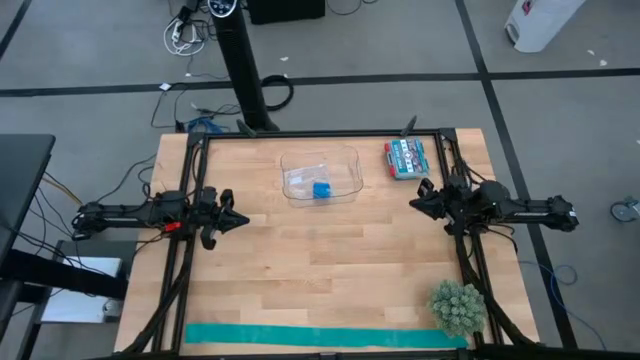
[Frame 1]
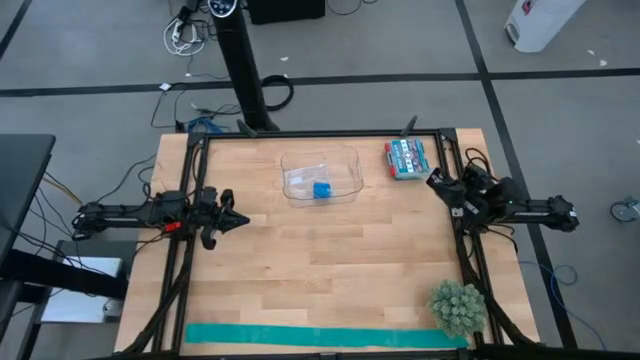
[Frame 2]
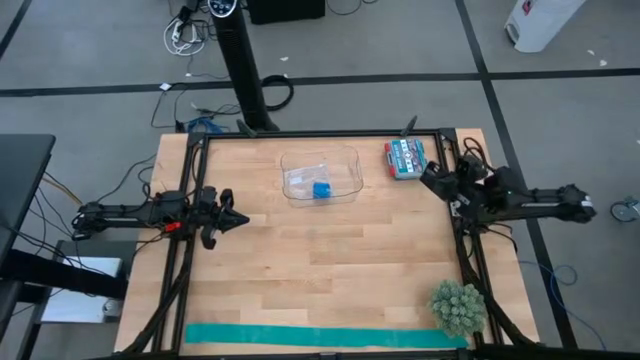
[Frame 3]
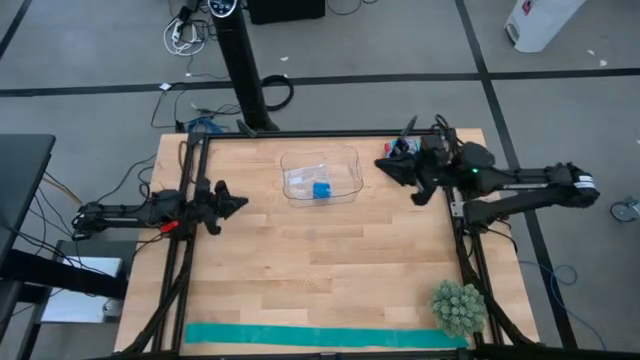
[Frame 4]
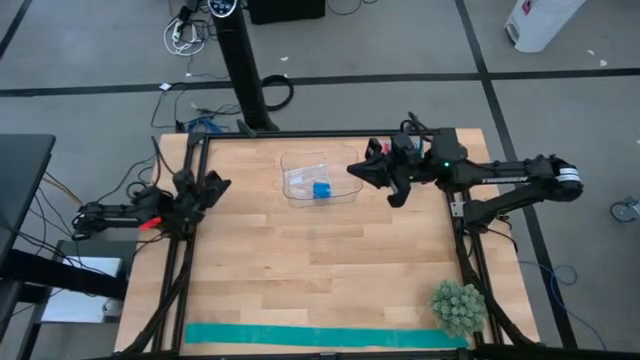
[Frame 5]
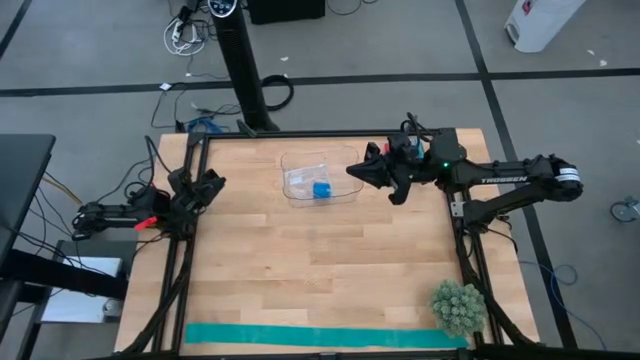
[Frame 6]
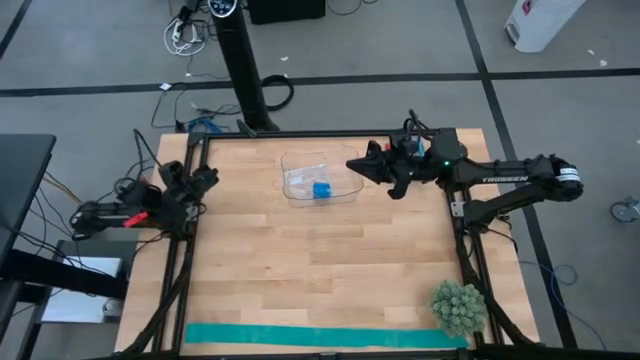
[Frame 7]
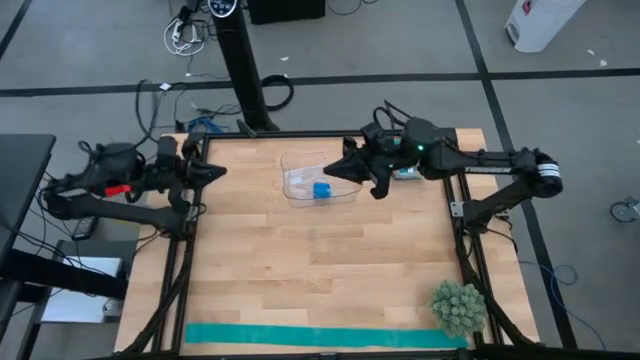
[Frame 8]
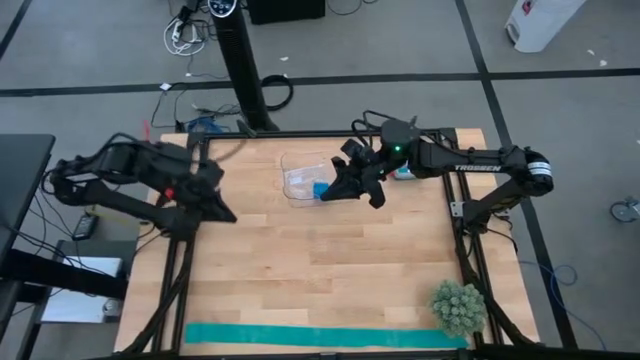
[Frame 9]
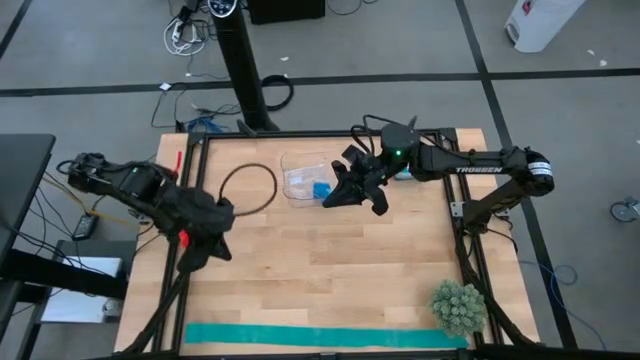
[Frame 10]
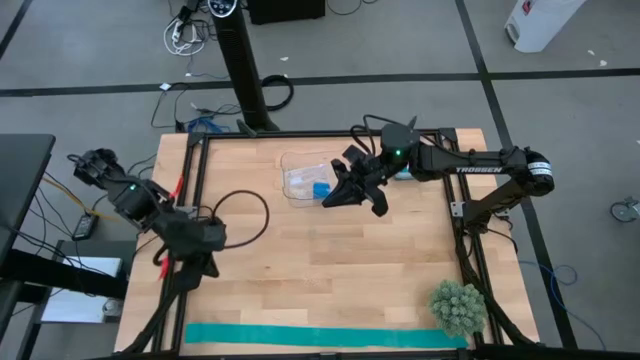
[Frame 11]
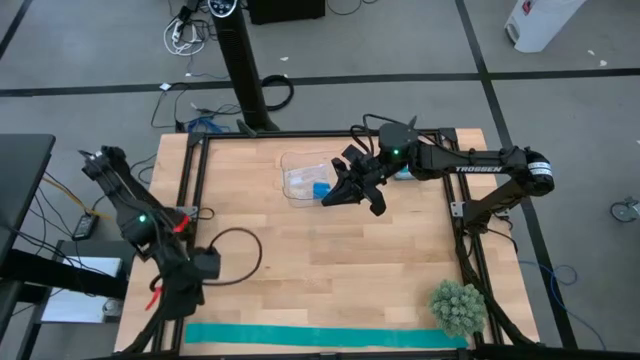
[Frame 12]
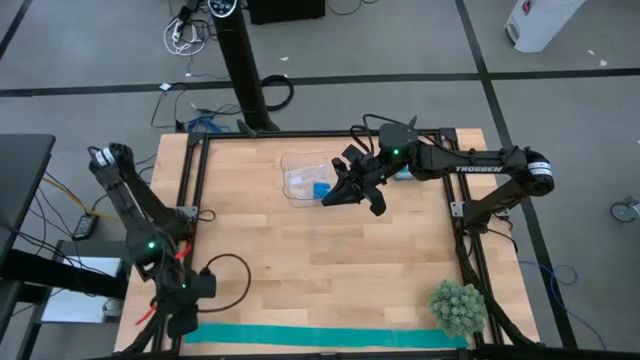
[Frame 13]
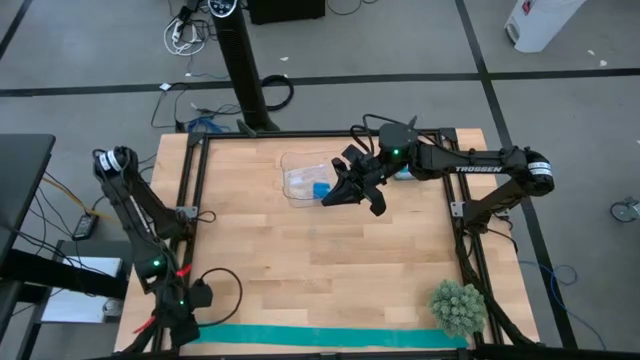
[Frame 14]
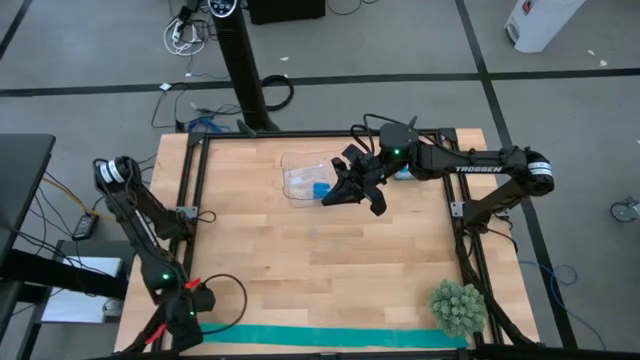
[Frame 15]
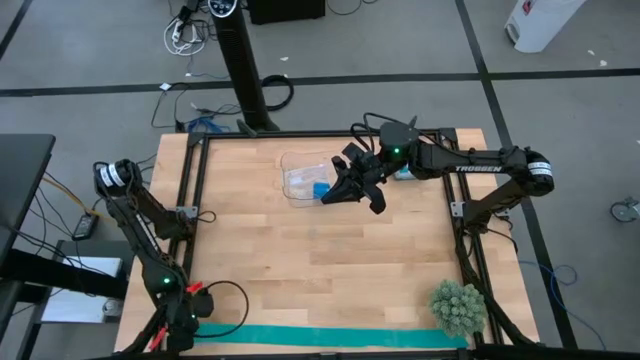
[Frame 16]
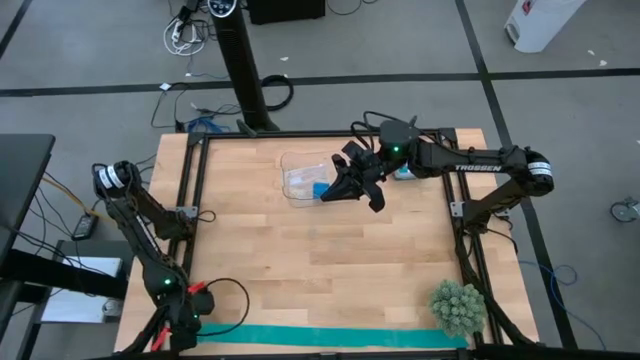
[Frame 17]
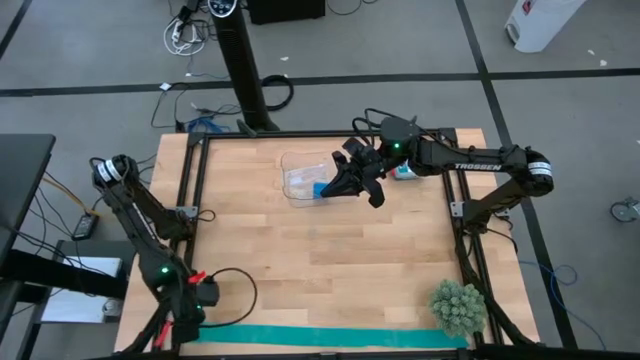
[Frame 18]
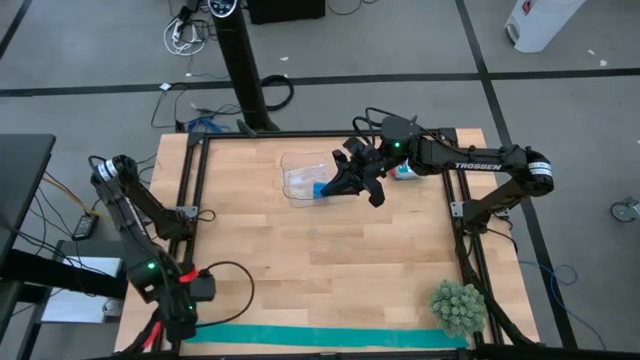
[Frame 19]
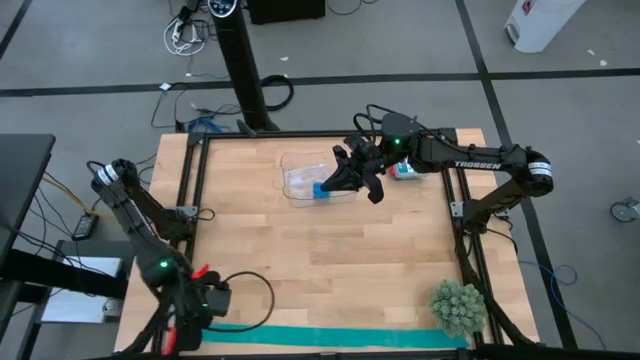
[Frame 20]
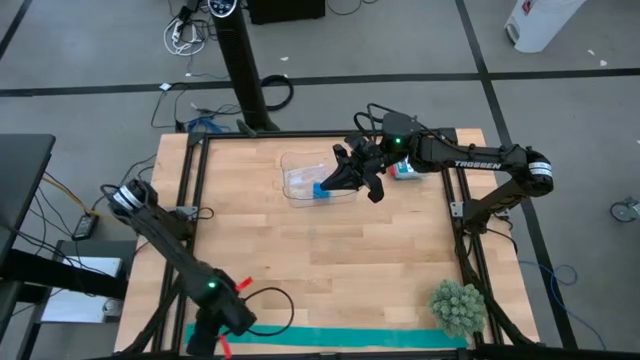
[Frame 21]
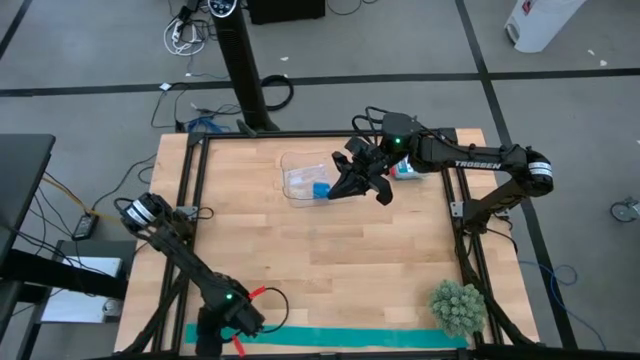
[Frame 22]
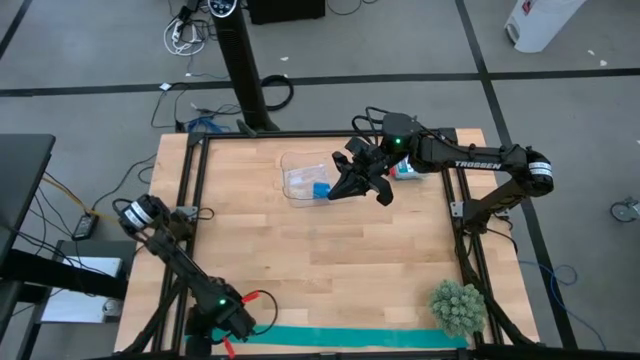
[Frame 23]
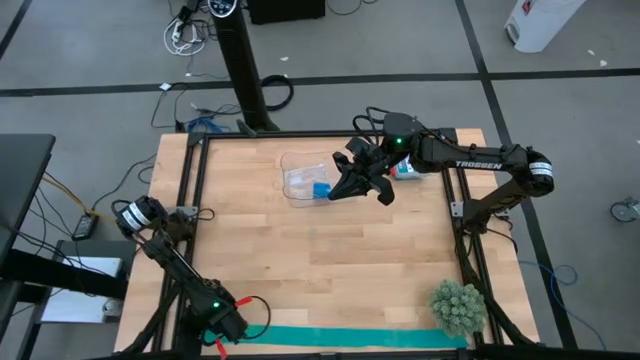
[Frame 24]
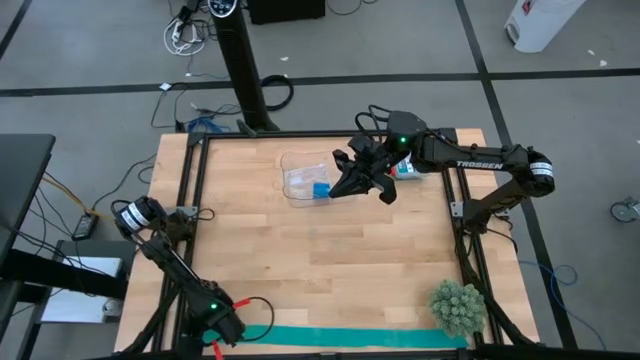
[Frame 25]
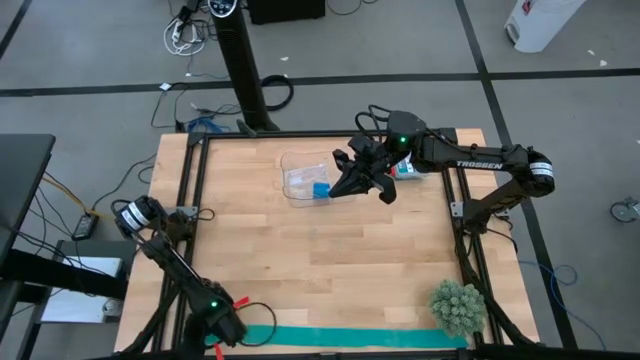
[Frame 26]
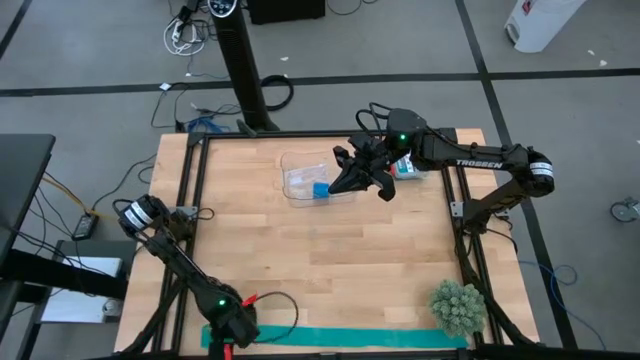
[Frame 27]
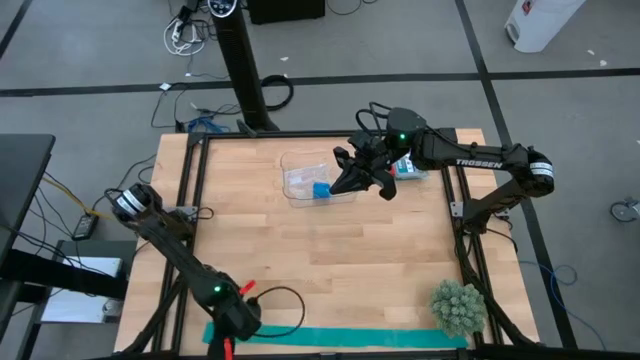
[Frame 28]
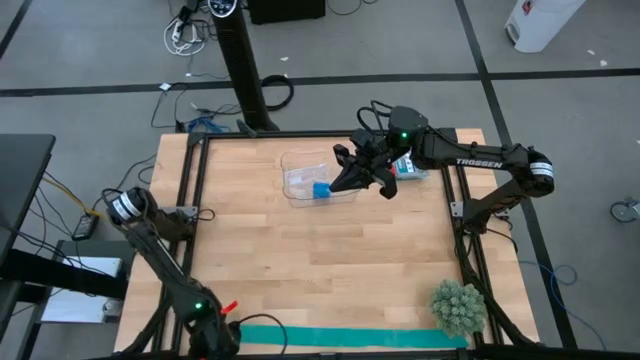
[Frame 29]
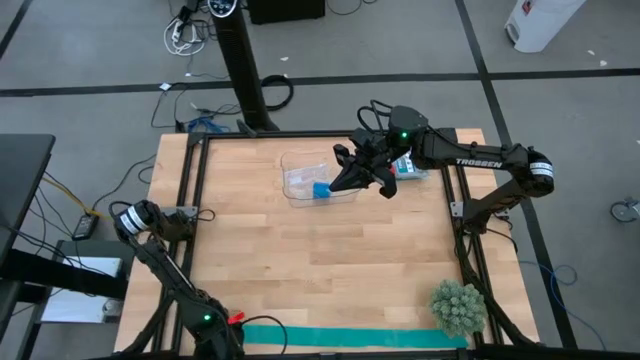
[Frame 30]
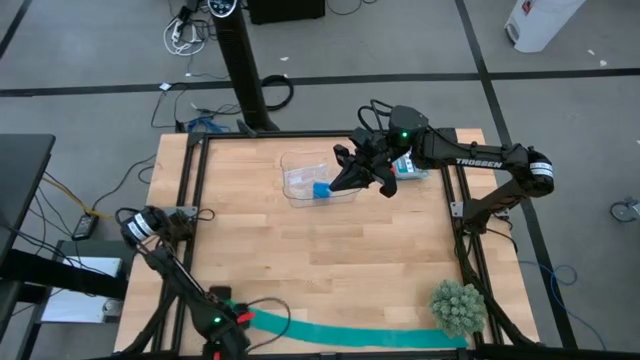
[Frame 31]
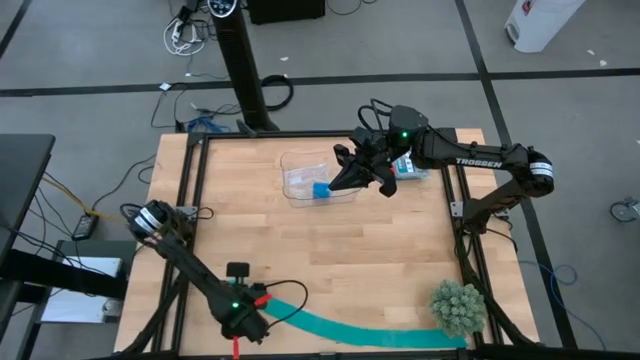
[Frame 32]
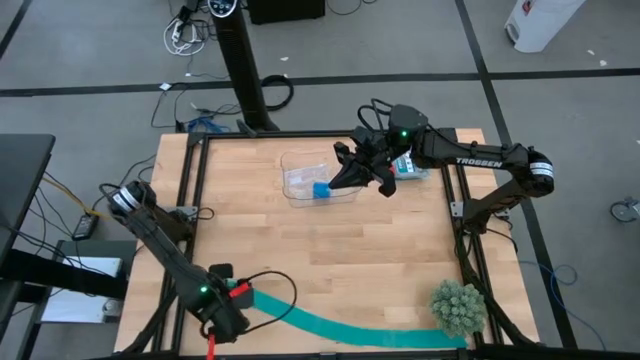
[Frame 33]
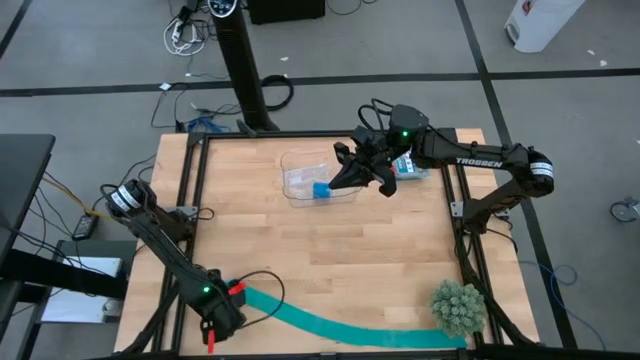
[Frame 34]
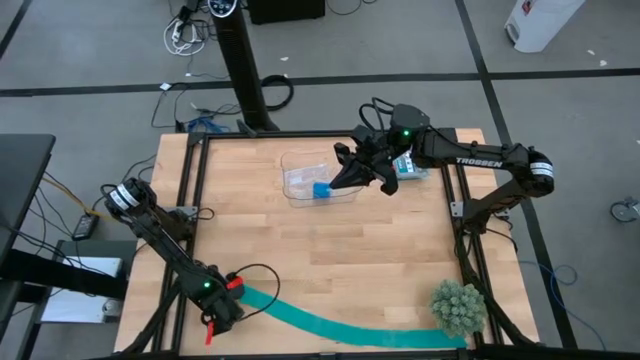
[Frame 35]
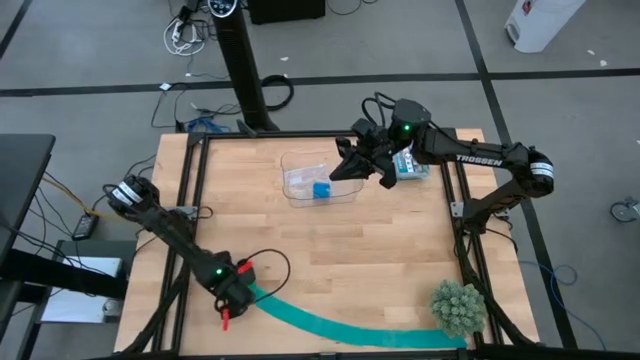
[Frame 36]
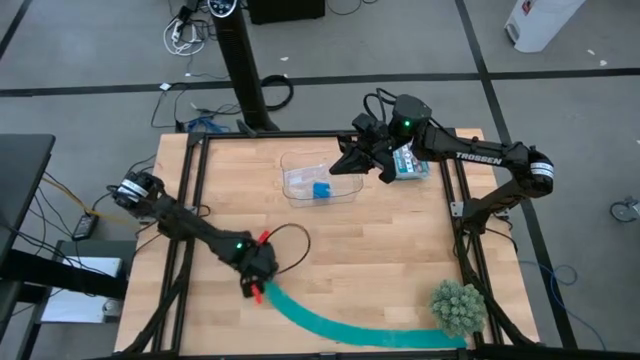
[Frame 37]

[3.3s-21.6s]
Task: Roll bandage
Roll the sky blue bandage
